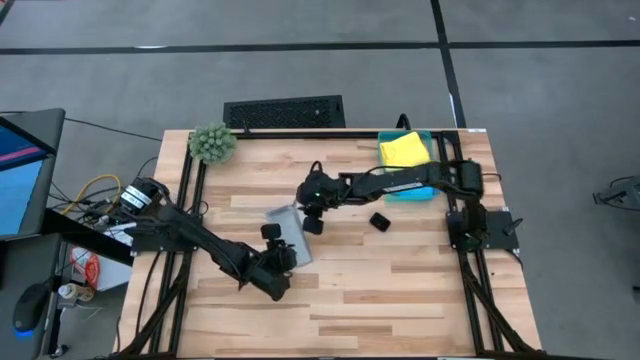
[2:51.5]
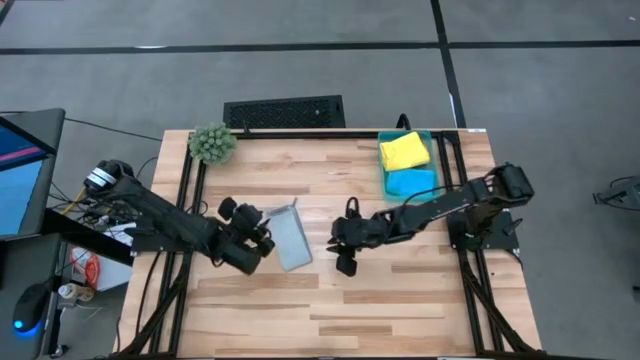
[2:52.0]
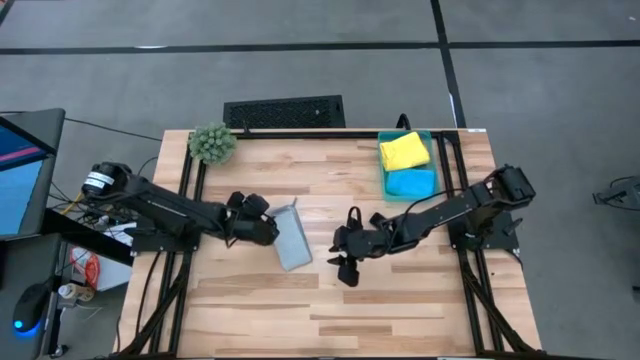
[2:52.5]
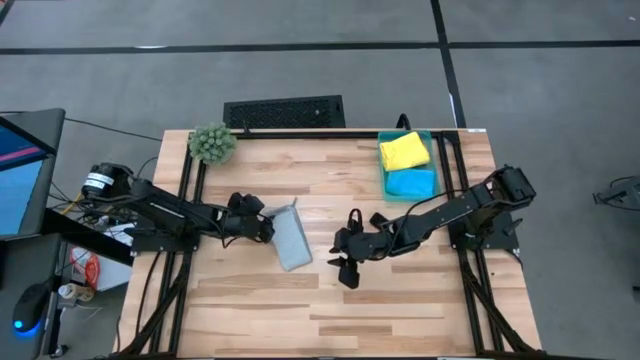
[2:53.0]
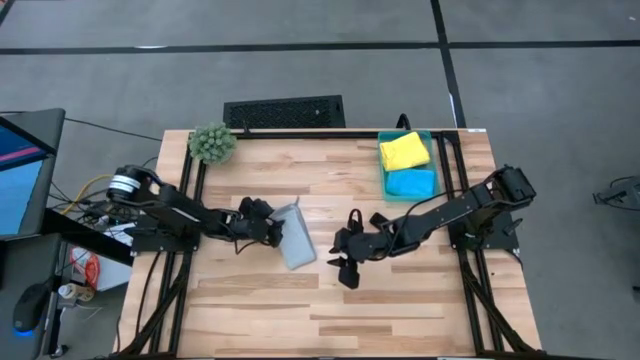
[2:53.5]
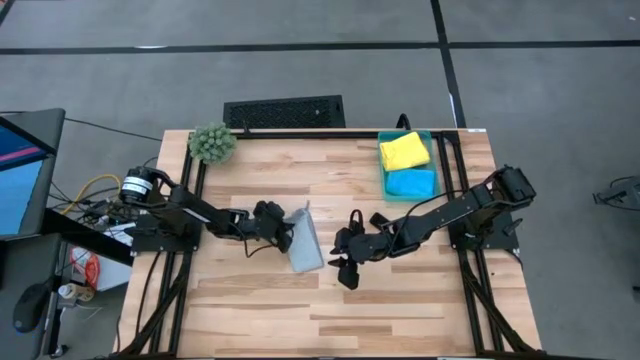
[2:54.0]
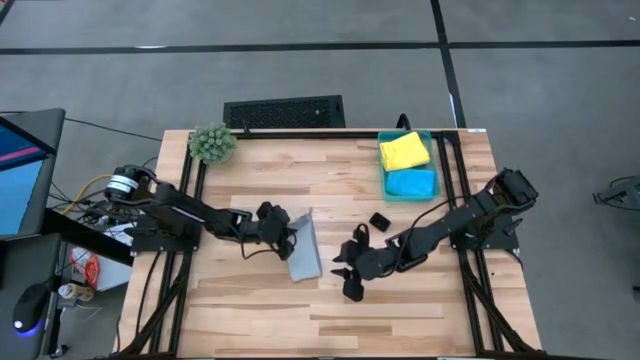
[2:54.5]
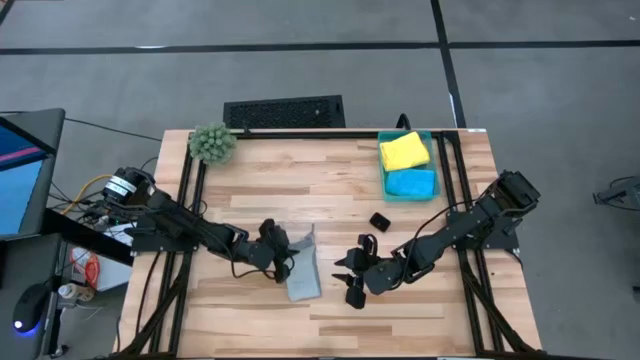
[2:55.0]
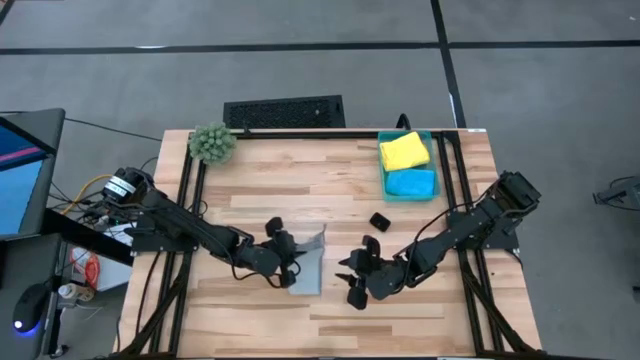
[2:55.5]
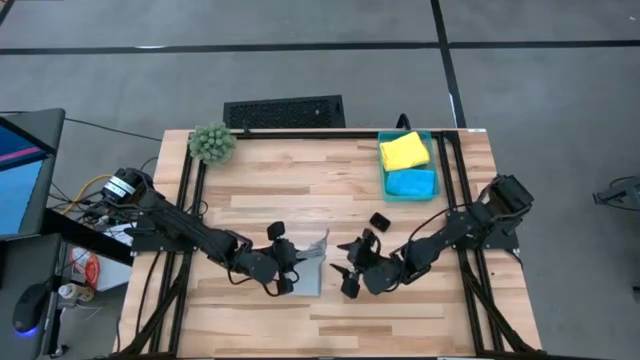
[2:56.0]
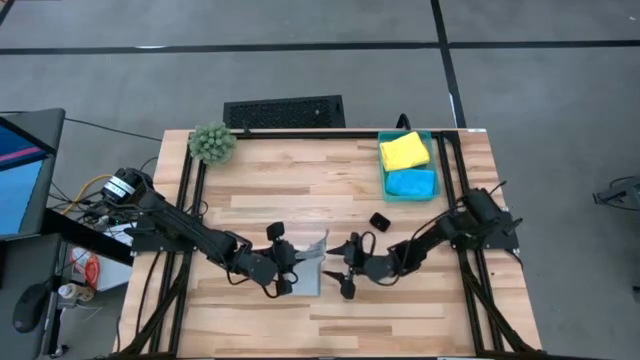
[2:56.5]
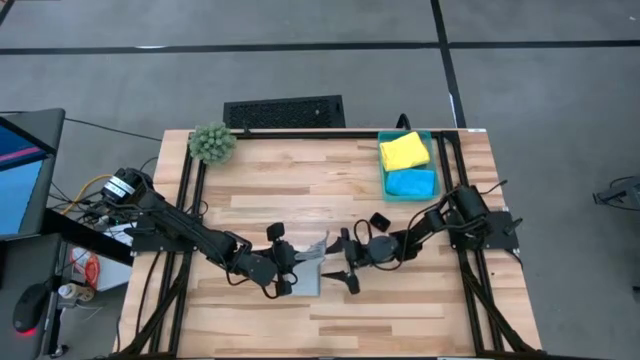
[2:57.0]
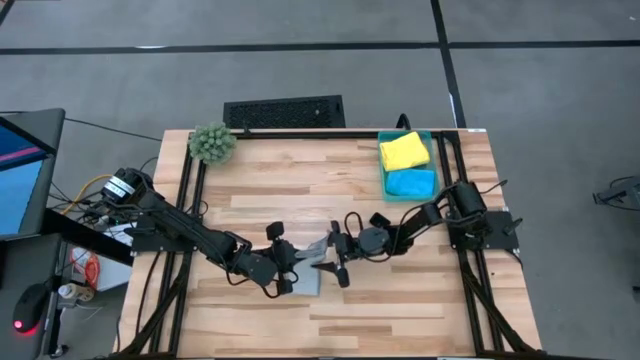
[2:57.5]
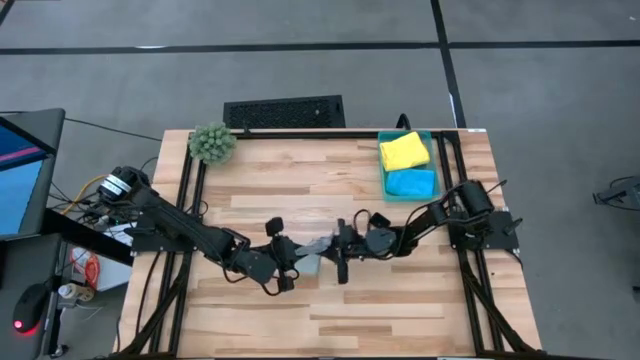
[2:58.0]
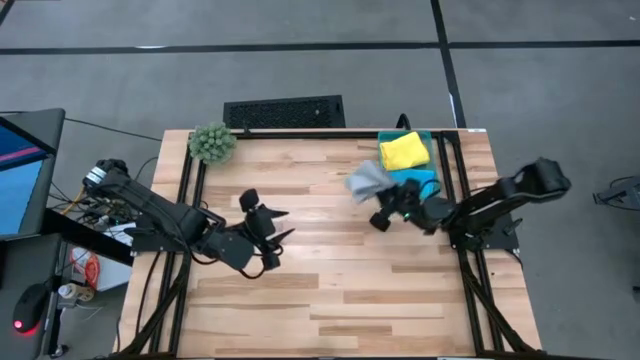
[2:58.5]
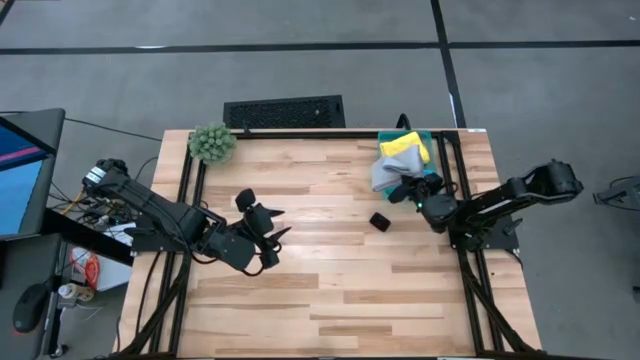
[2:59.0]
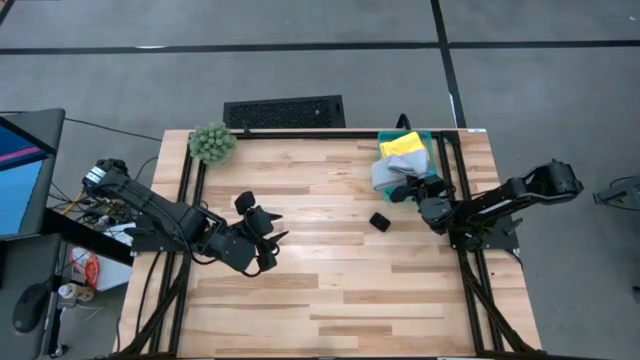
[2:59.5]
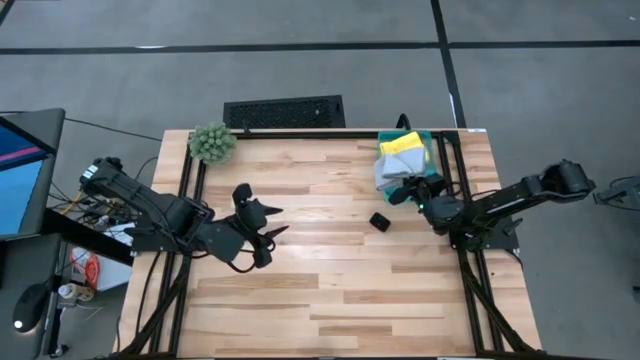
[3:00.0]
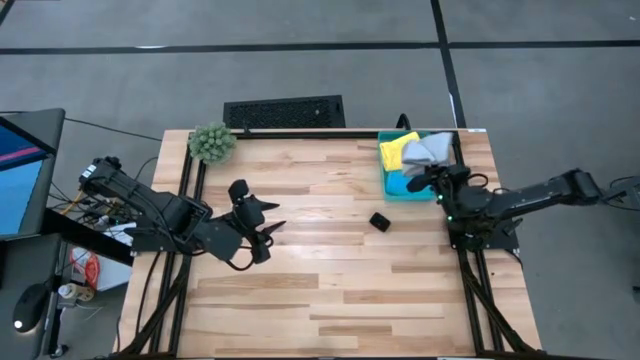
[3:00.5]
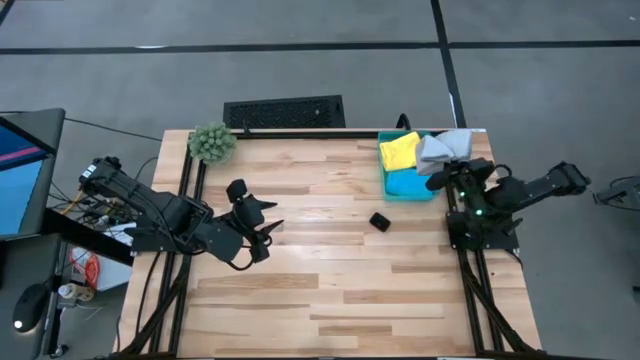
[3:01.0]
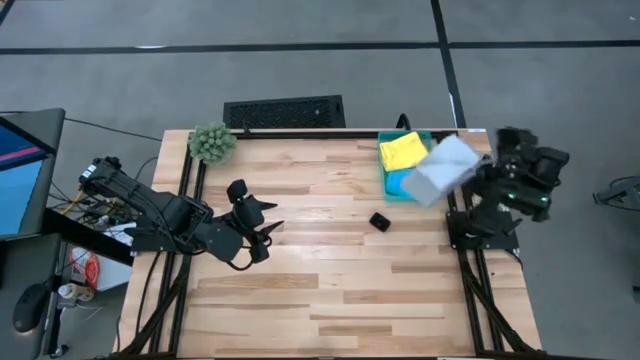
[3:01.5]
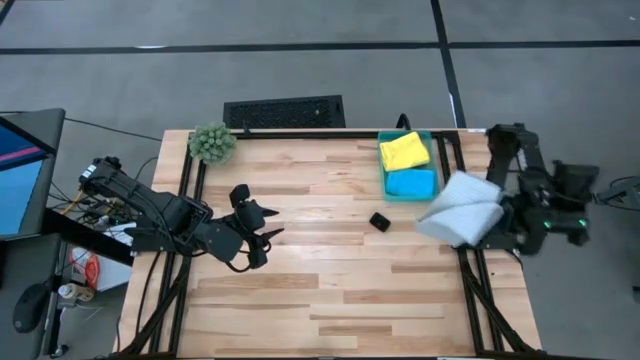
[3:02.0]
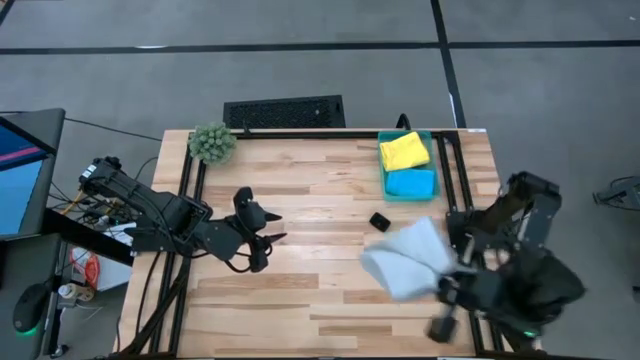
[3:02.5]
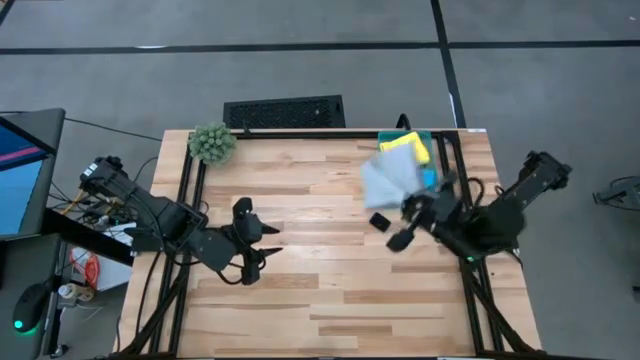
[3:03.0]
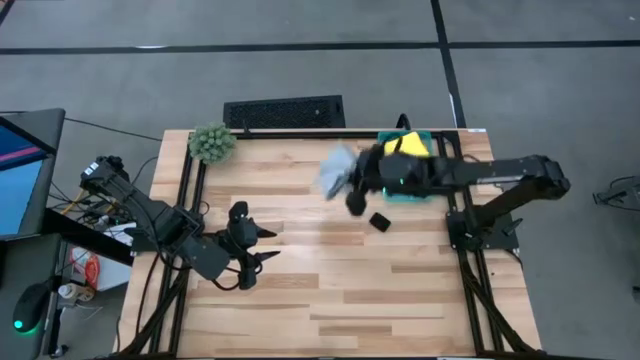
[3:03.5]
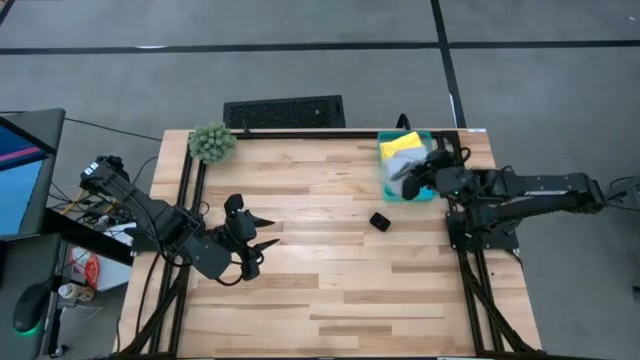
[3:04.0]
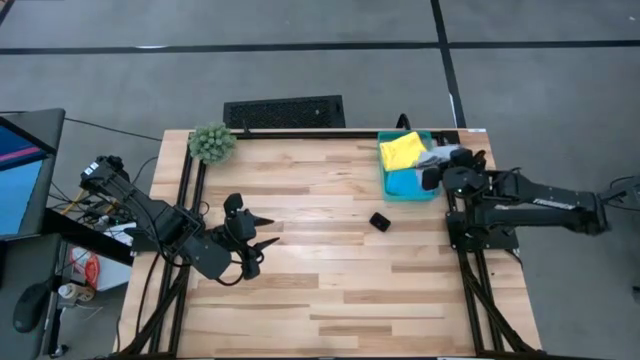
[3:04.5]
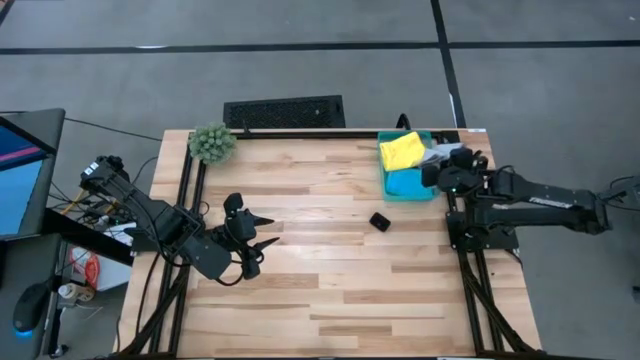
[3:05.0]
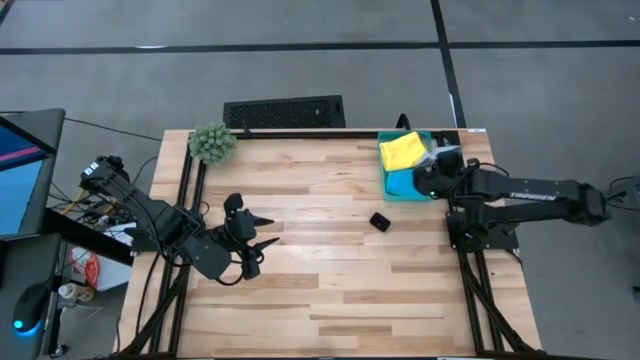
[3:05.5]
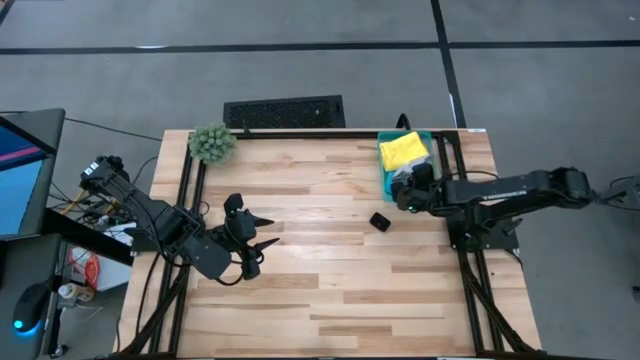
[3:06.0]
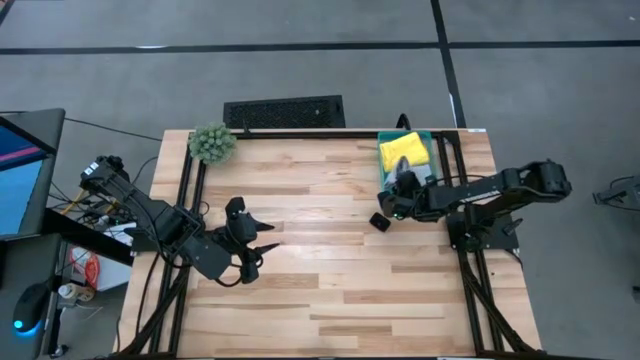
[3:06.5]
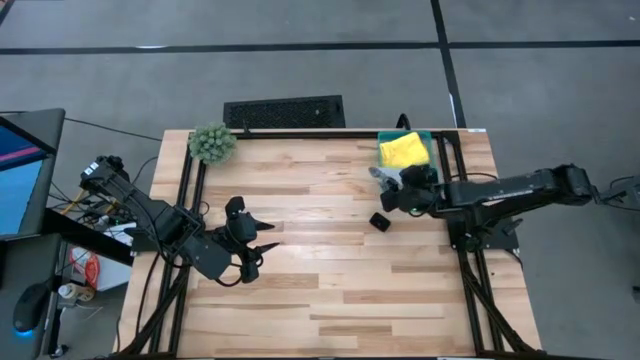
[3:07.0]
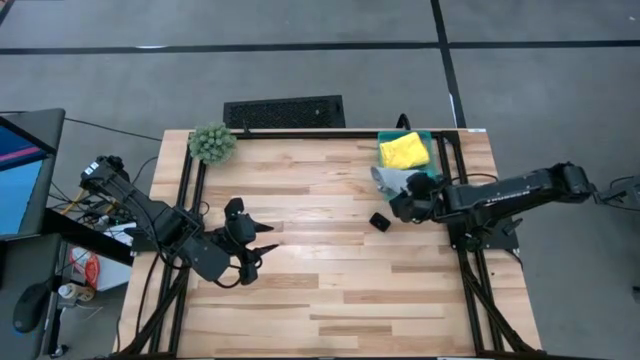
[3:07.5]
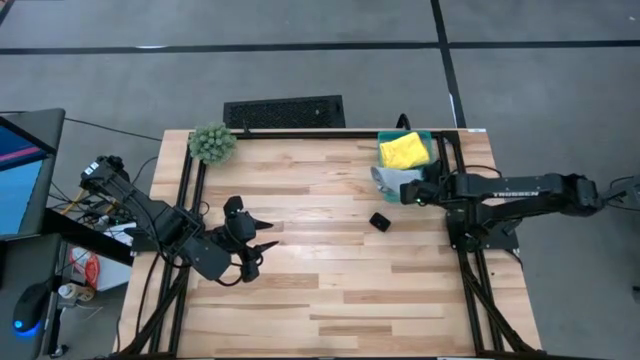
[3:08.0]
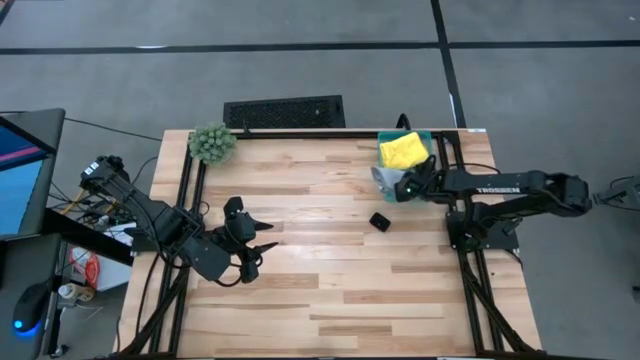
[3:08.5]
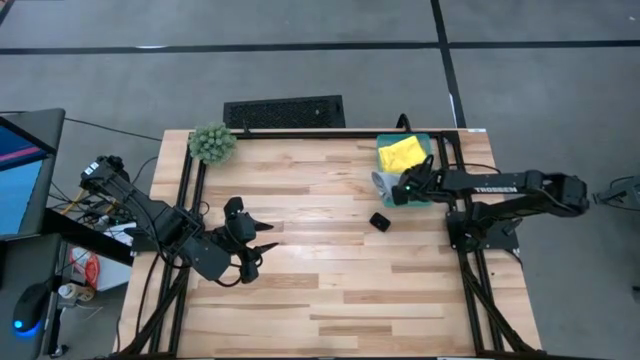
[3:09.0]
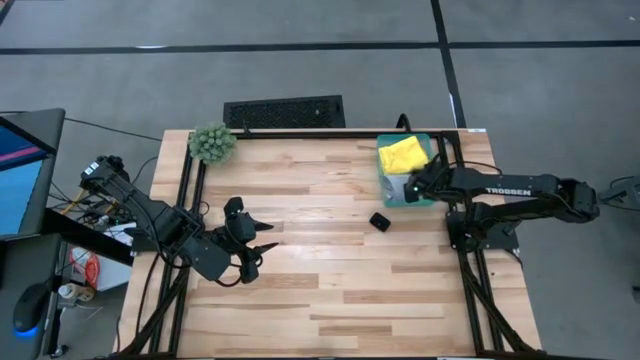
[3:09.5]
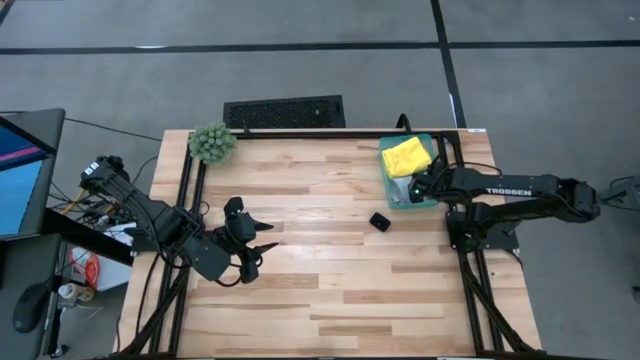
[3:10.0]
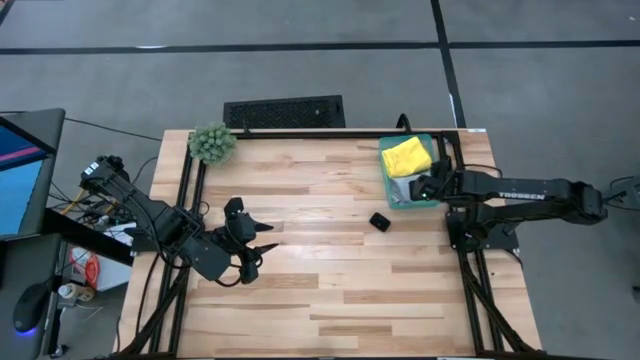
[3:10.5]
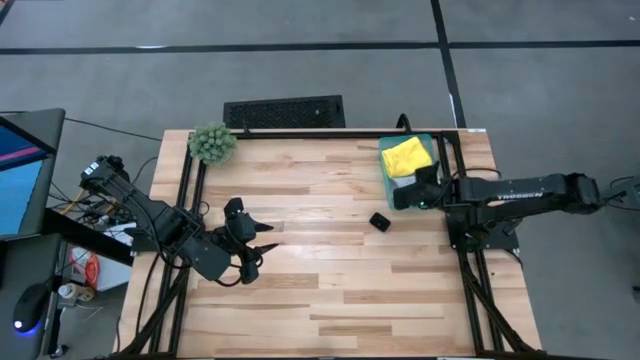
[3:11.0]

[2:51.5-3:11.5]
Task: Fold microfiber towels
Stack the folded gray microfiber on top of the blue microfiber cloth in the bin

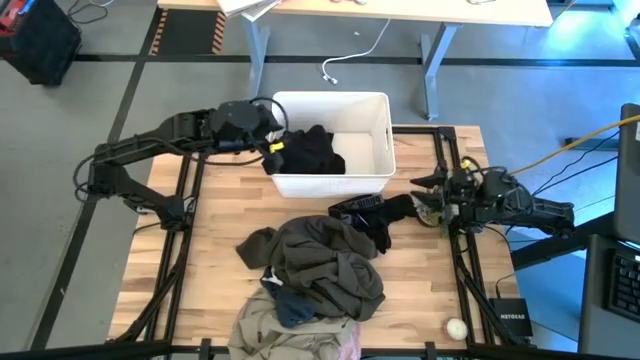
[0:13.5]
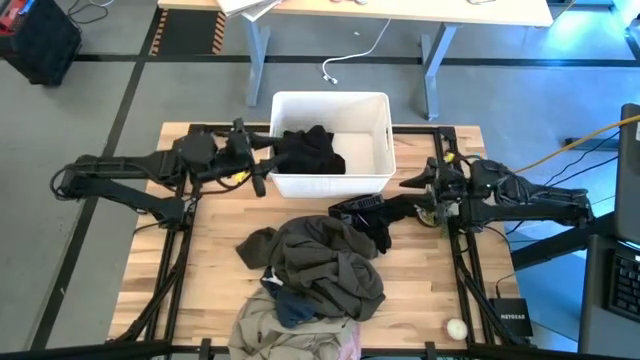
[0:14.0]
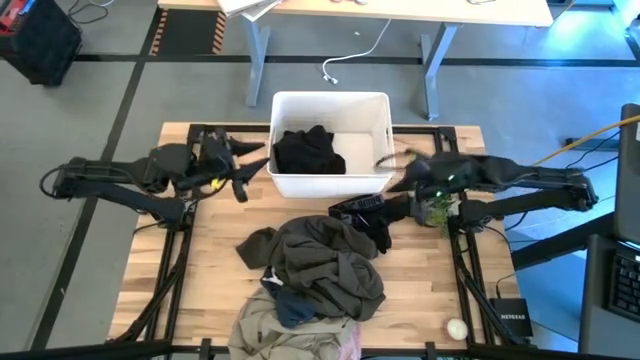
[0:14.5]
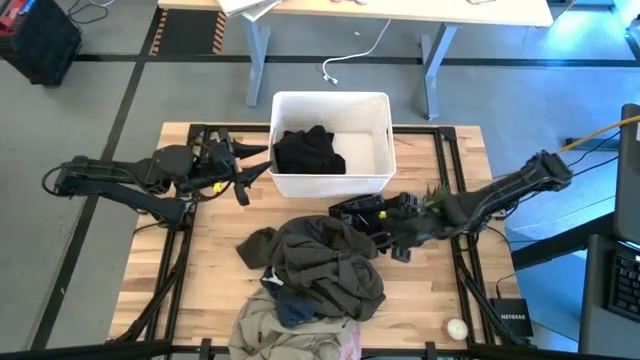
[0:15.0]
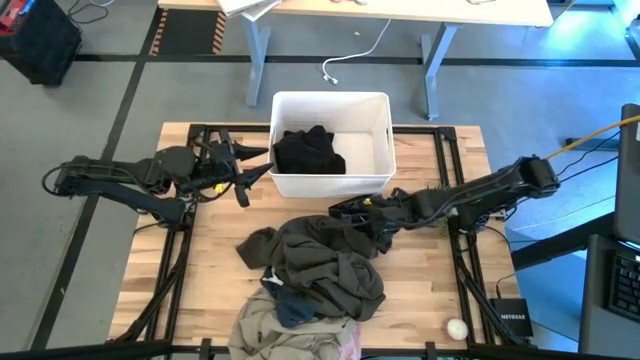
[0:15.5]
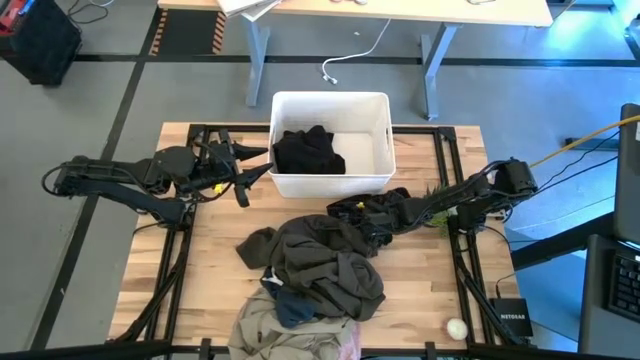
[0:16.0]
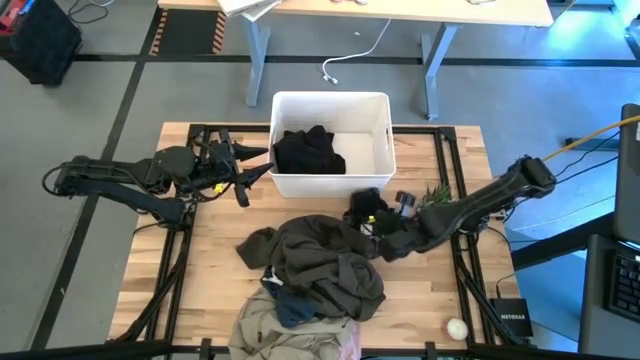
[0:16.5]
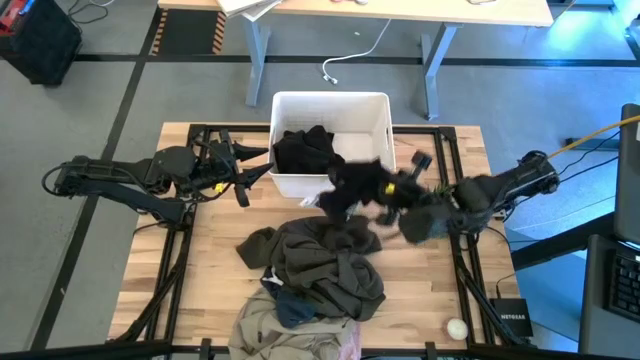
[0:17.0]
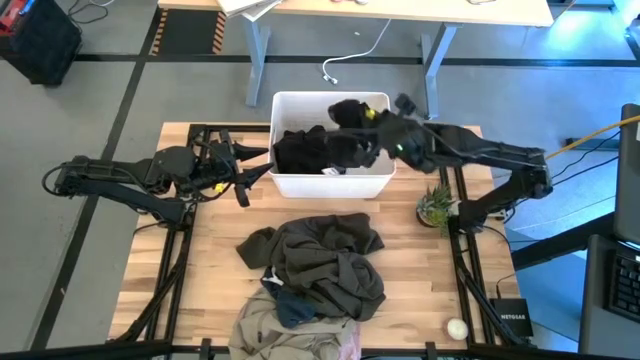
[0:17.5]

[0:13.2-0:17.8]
Task: Sort clothes
Put the black boxer into the white bin
